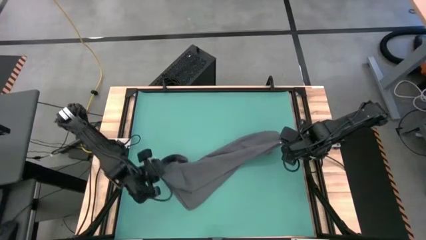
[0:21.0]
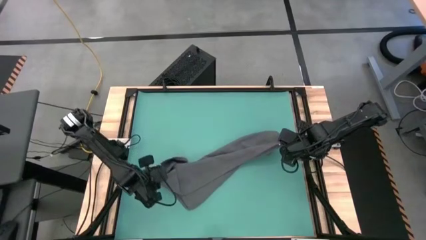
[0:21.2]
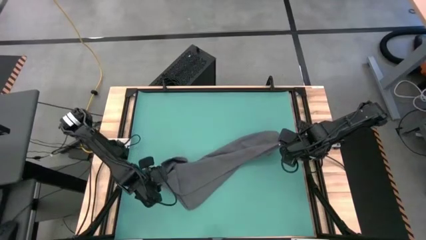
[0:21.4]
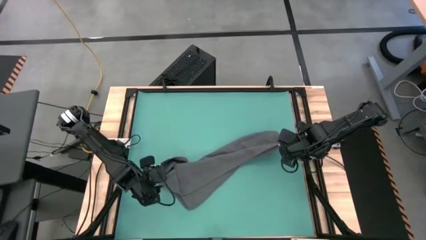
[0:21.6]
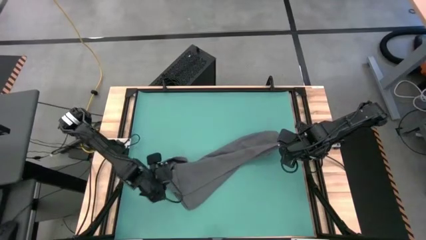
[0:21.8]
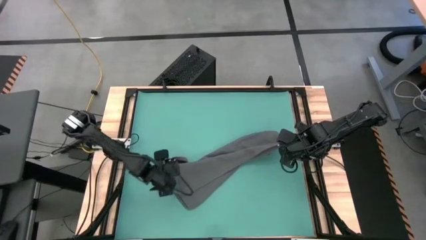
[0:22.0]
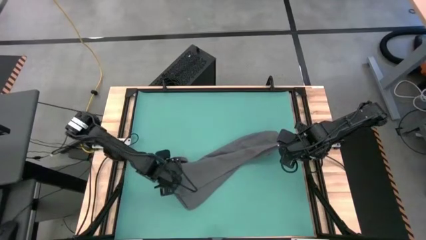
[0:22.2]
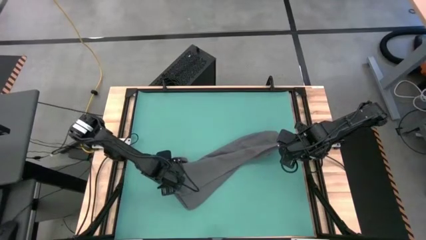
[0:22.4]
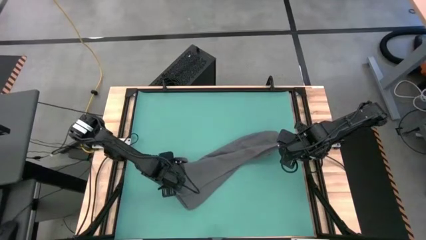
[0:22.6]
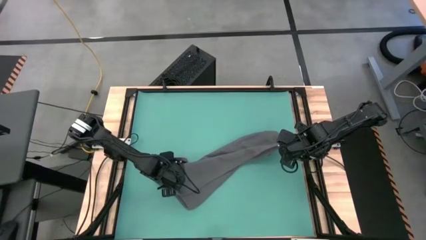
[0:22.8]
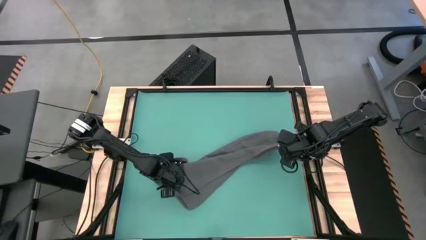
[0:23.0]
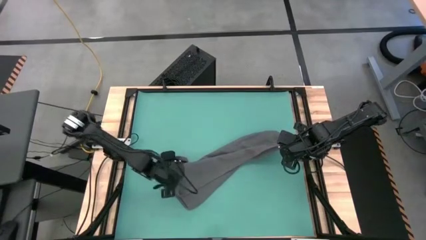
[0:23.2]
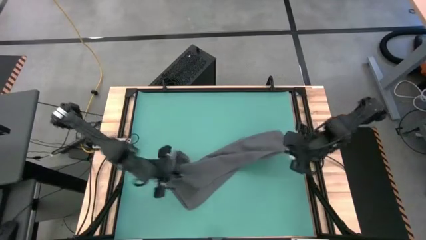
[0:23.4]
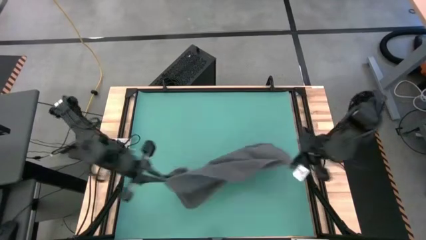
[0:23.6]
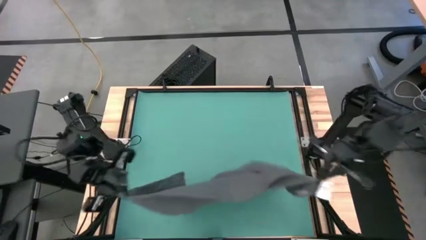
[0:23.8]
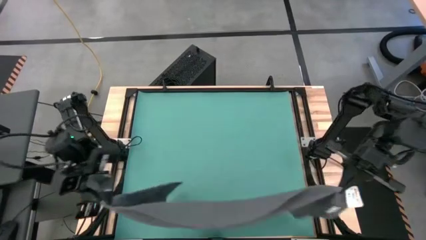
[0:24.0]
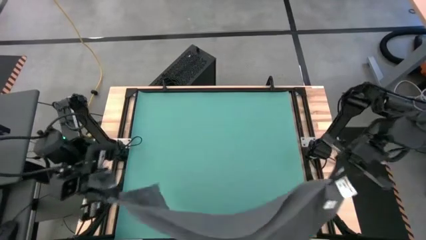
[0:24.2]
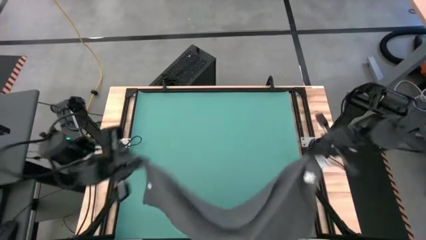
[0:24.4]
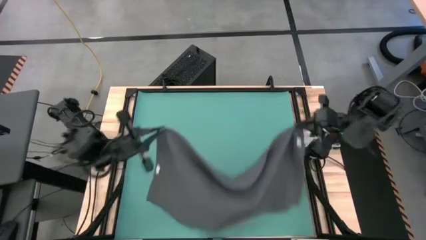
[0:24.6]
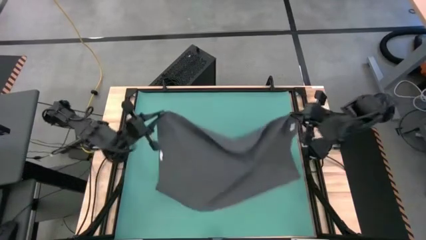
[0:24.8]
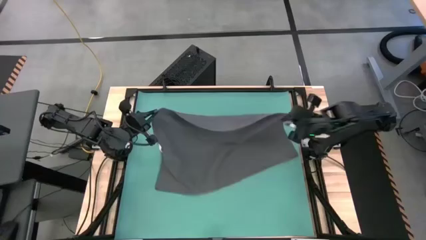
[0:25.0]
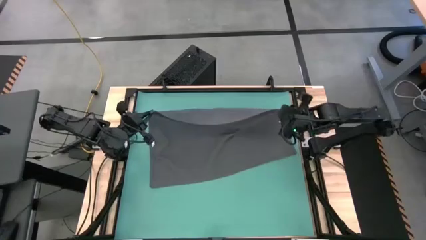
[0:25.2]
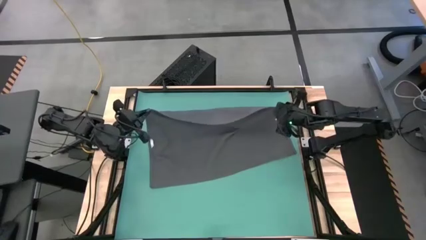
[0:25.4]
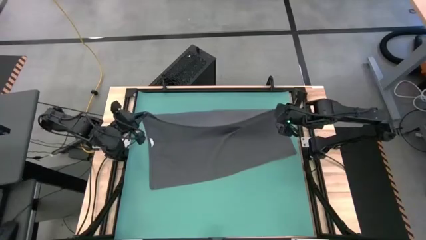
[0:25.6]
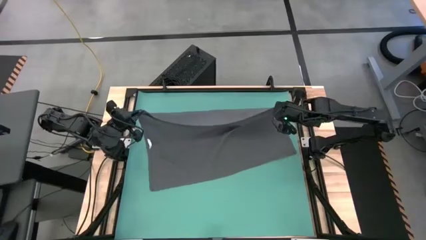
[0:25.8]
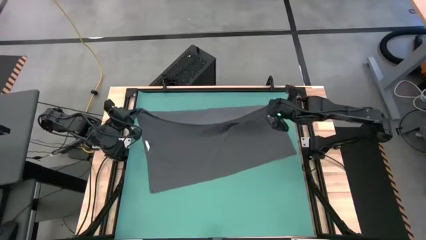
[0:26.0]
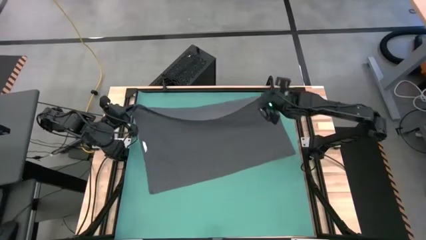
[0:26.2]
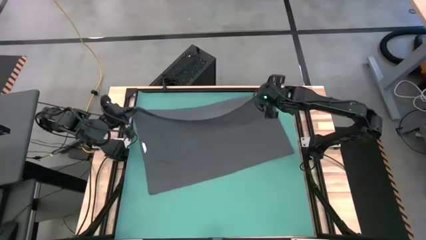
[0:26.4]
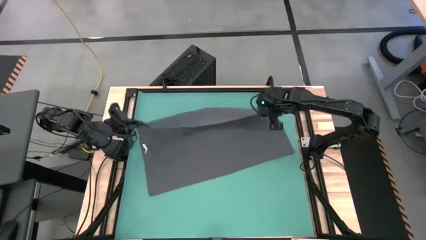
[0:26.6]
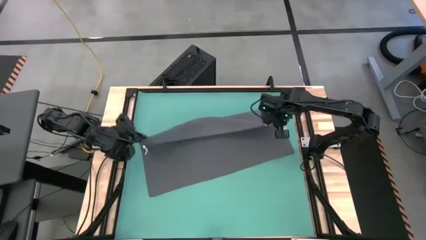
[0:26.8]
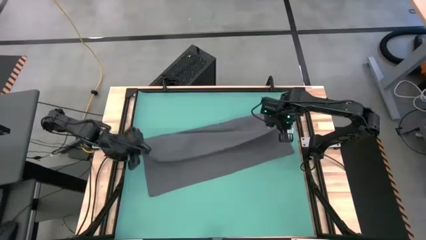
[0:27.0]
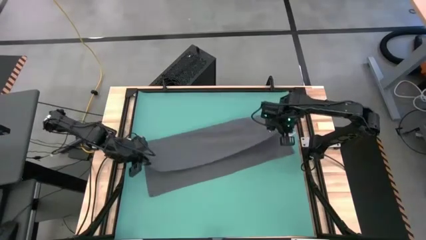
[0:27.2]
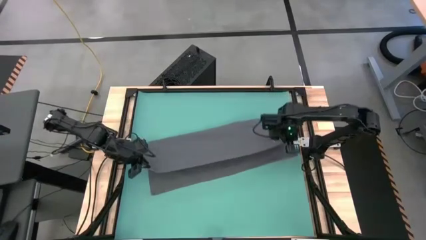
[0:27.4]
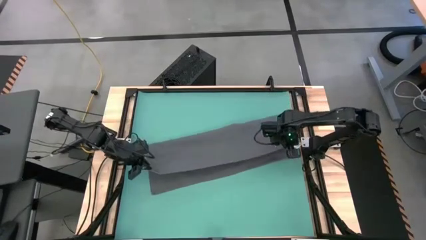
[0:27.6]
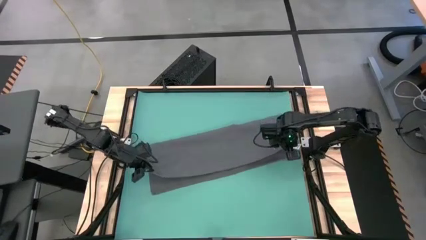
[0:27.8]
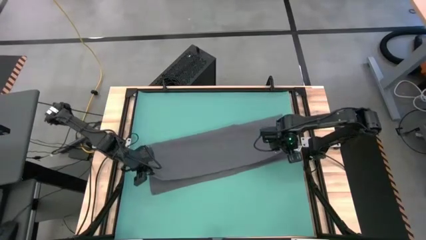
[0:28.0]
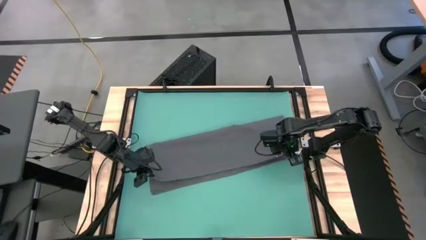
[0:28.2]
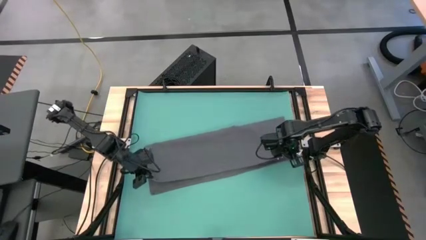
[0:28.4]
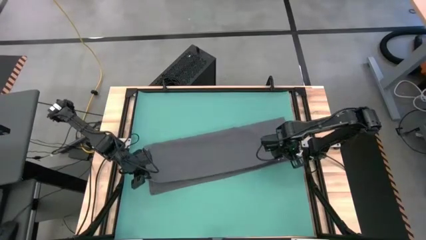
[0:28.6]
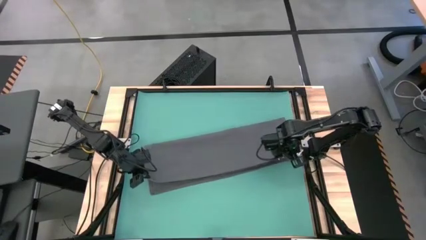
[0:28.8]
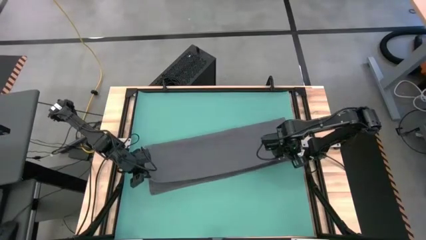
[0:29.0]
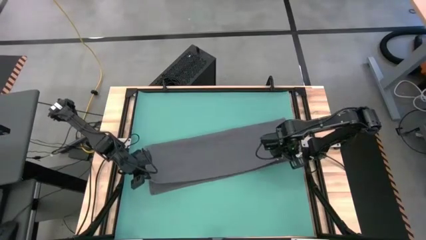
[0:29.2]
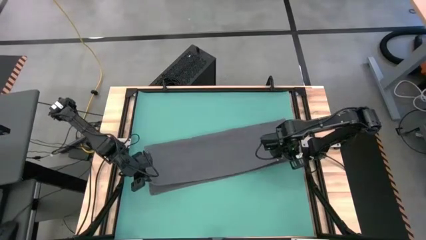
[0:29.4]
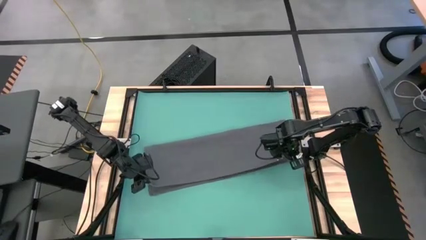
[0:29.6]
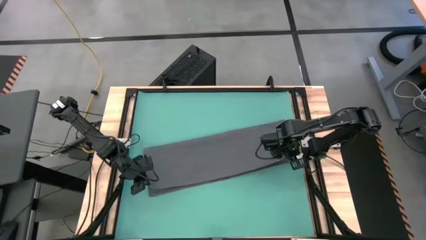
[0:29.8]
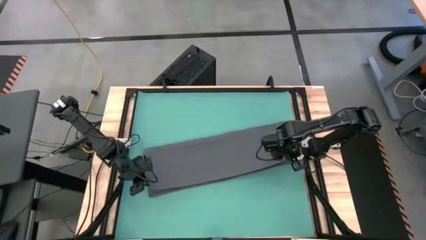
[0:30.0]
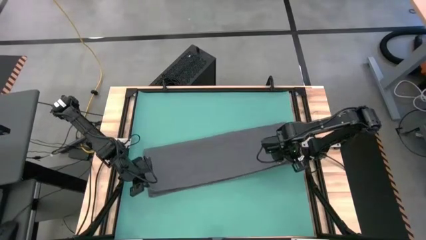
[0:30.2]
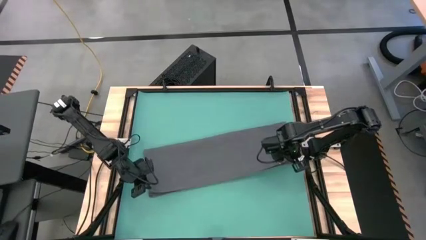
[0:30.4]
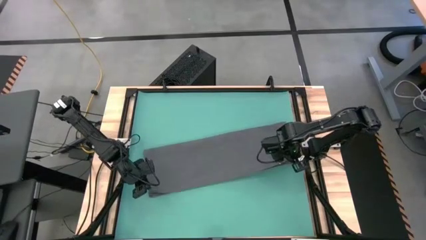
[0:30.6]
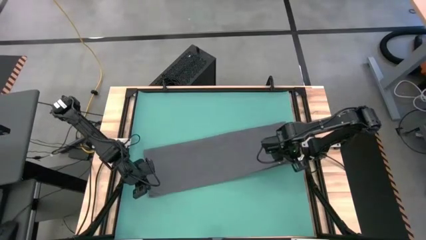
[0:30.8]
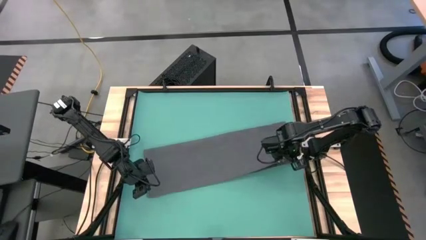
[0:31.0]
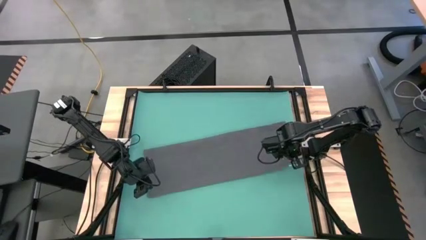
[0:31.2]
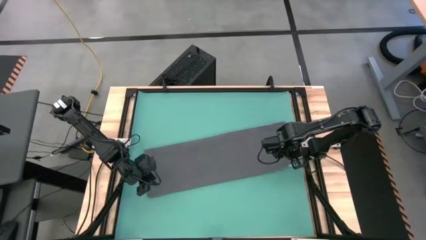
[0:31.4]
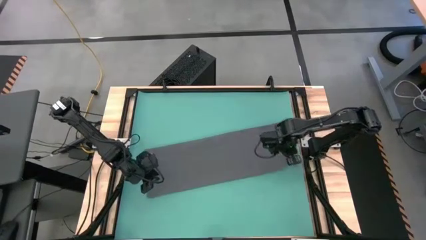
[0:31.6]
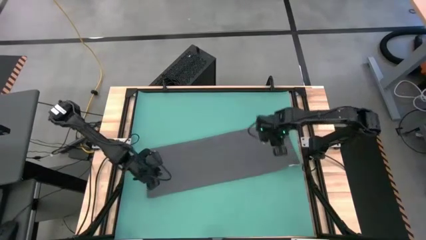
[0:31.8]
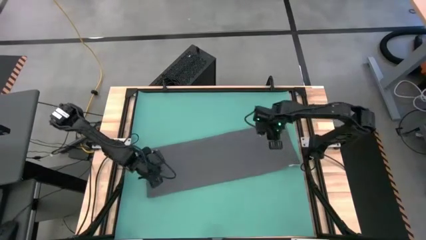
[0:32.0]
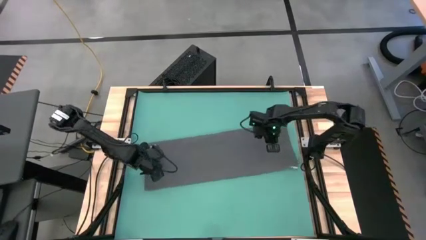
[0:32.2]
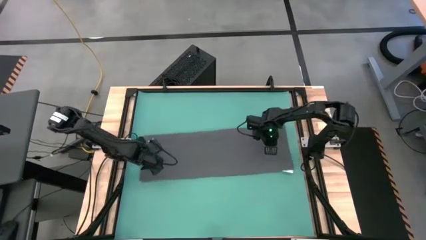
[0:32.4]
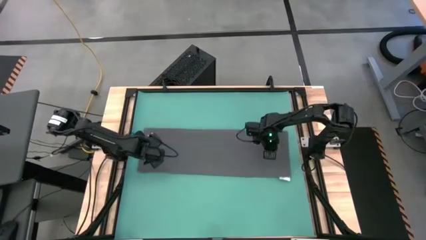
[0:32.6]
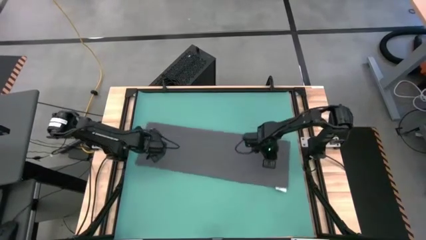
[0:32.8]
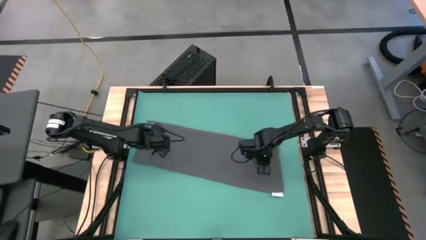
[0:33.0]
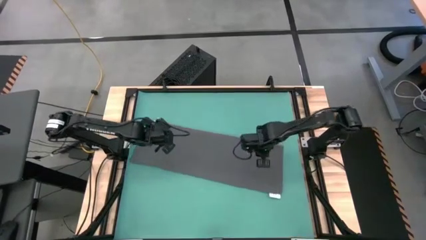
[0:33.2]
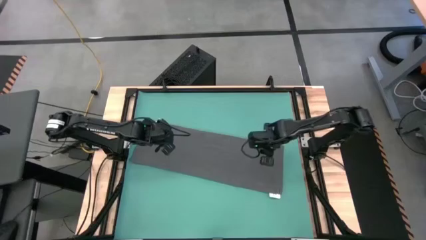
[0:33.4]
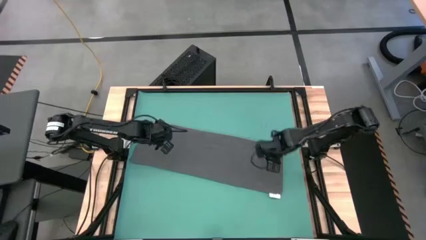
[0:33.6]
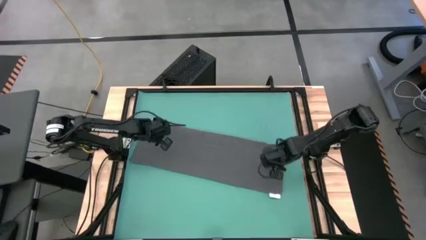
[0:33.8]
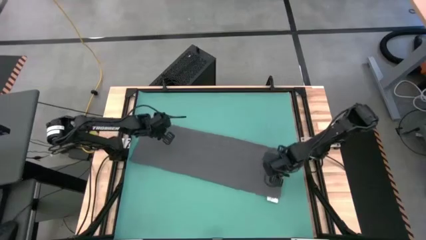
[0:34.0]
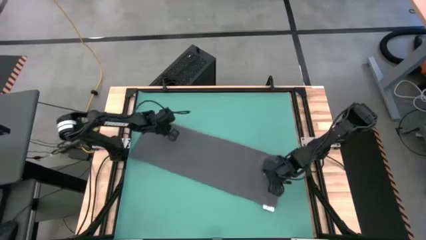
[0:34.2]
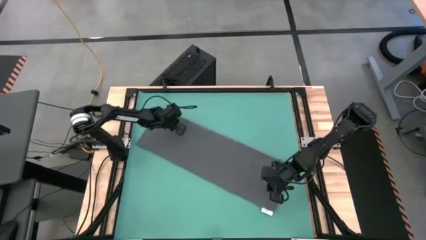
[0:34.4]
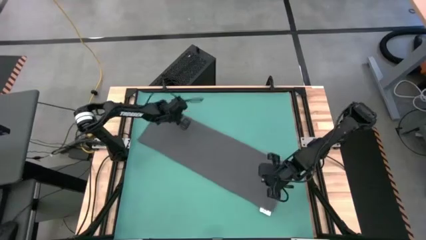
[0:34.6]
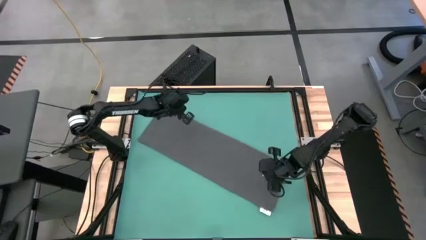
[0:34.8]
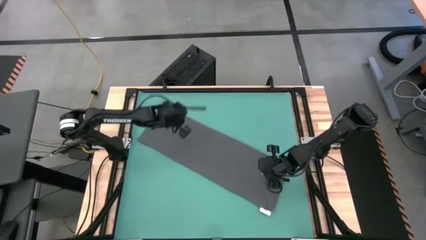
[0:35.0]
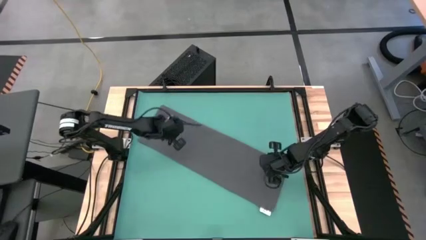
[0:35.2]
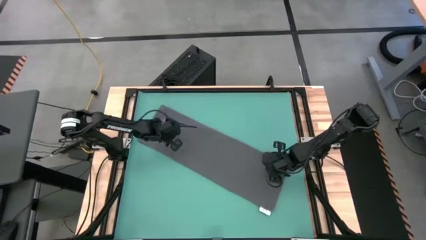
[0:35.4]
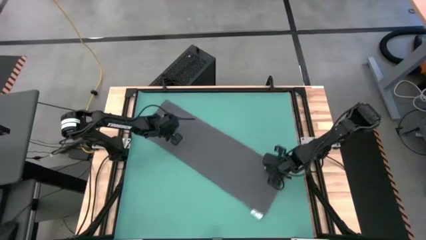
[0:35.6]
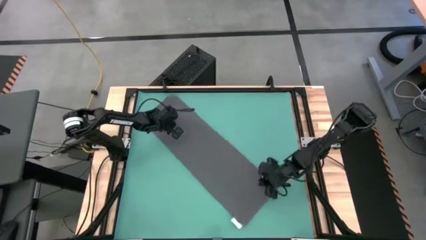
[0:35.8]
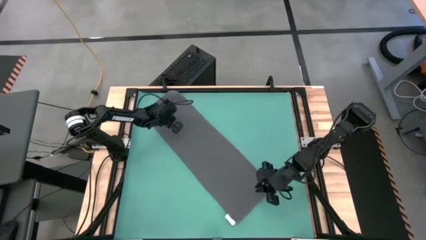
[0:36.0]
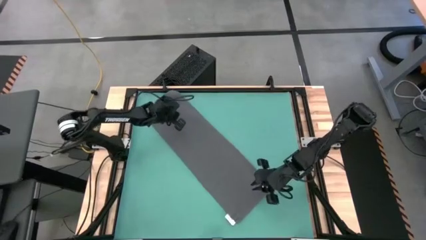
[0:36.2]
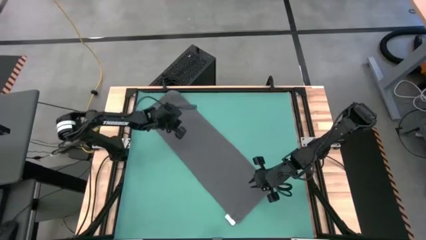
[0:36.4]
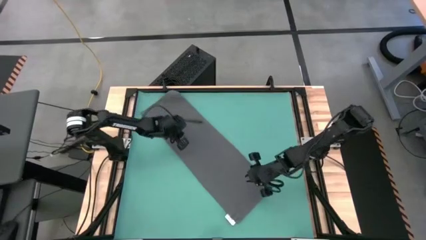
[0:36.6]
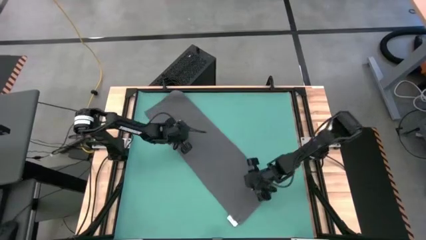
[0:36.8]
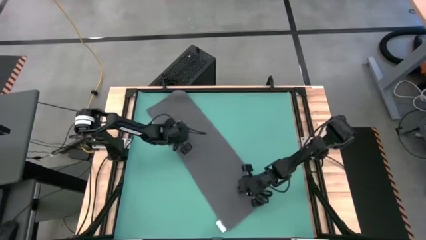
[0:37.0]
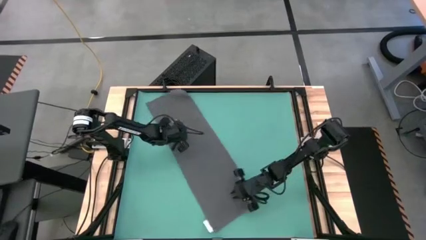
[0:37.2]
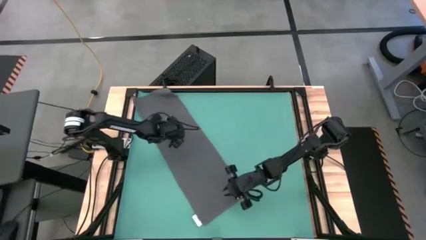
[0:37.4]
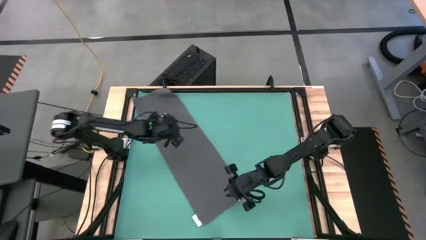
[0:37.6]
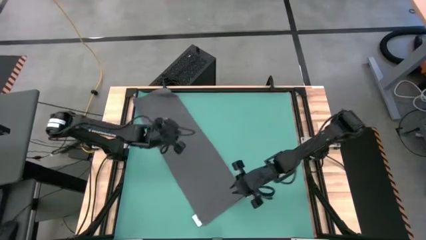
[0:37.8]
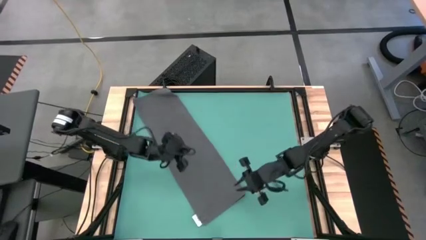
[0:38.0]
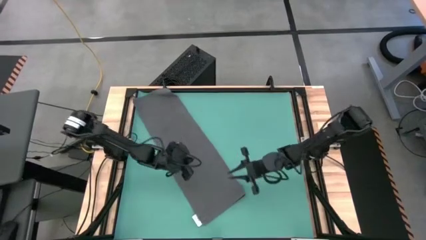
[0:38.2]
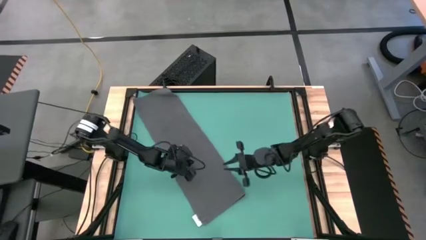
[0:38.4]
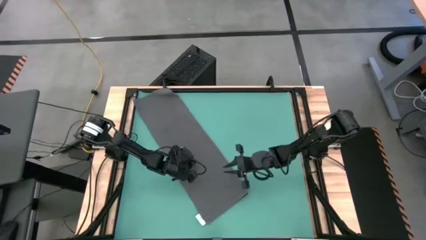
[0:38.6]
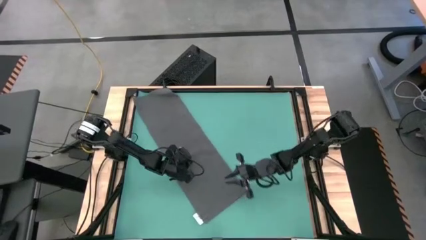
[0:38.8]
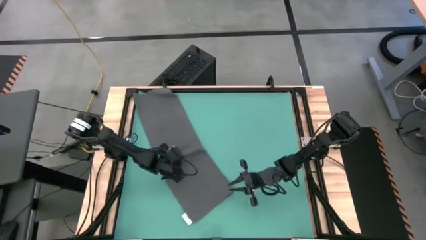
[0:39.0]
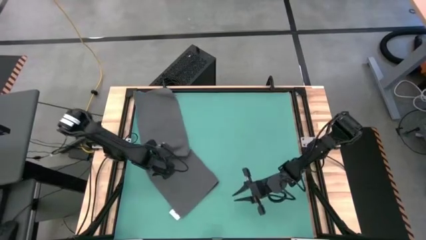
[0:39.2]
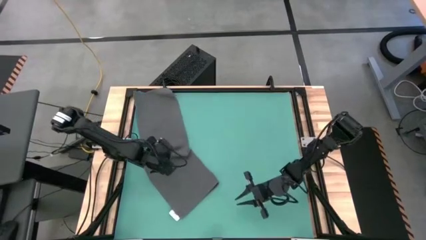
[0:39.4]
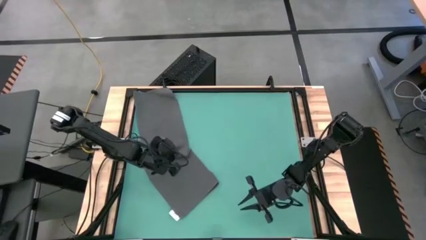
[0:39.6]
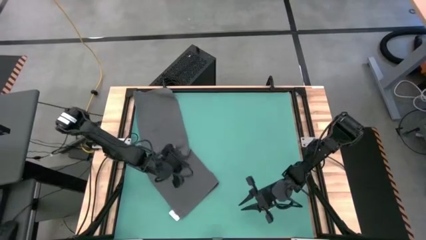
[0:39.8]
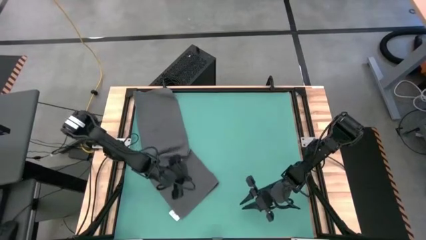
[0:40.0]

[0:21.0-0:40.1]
Task: Roll towel
Roll the gray towel
